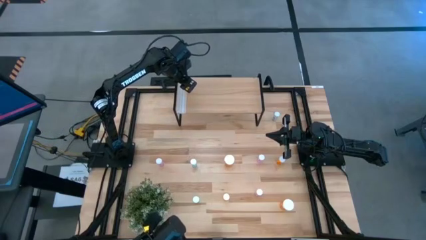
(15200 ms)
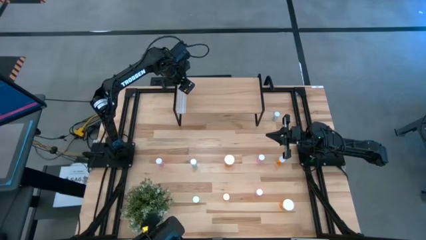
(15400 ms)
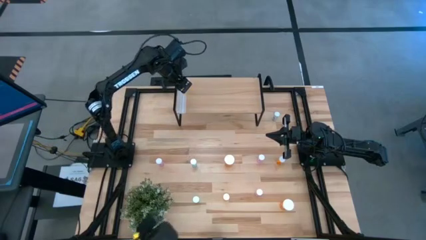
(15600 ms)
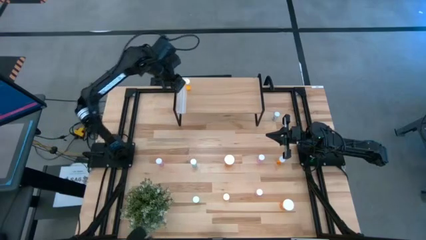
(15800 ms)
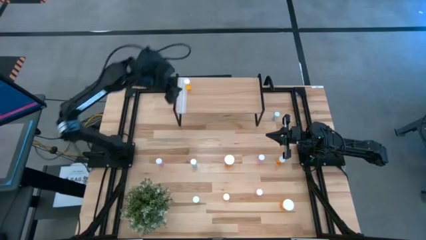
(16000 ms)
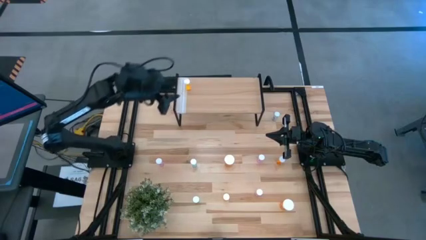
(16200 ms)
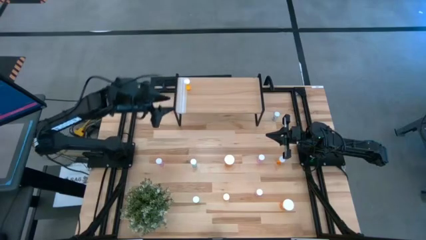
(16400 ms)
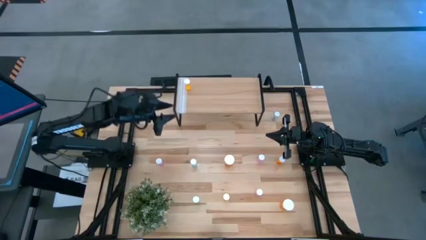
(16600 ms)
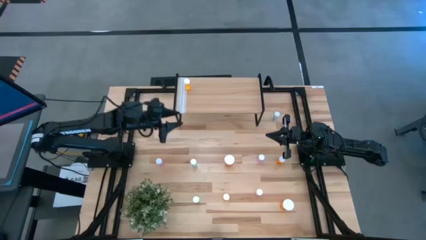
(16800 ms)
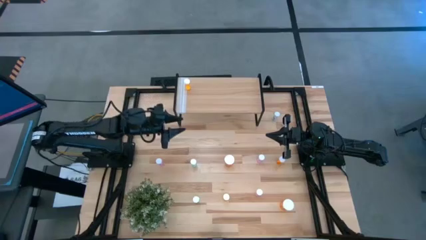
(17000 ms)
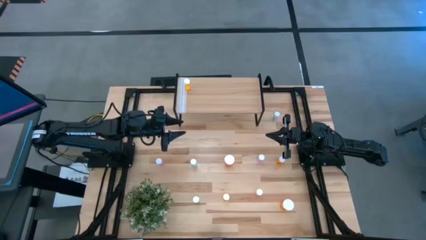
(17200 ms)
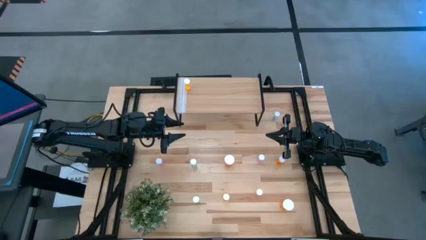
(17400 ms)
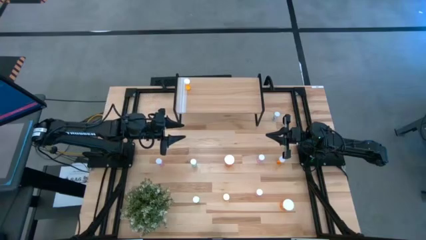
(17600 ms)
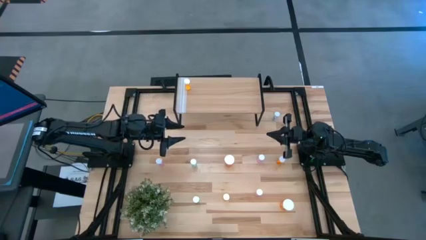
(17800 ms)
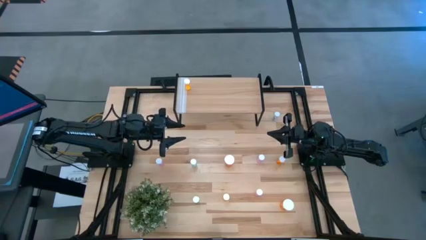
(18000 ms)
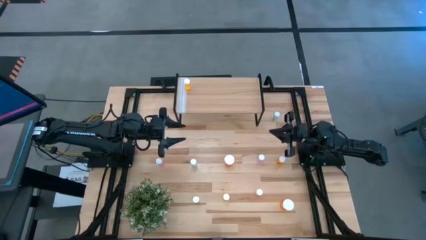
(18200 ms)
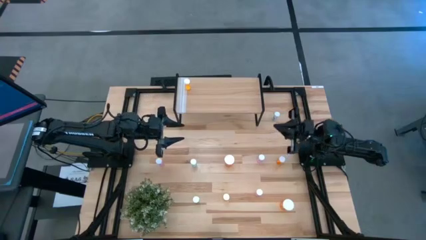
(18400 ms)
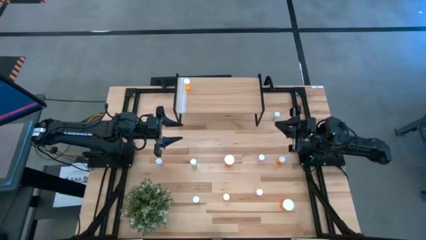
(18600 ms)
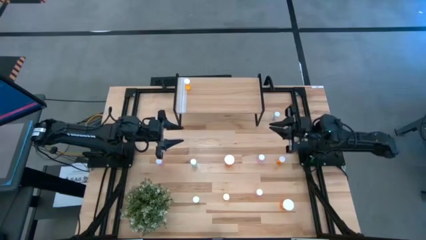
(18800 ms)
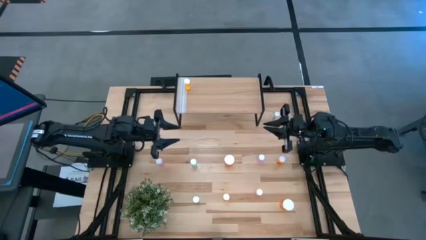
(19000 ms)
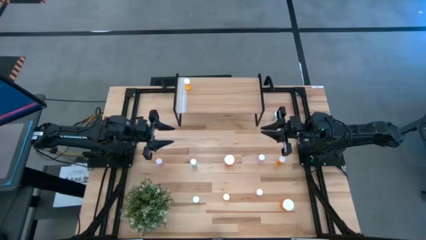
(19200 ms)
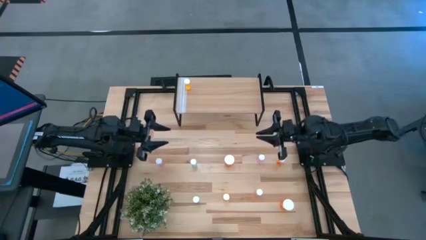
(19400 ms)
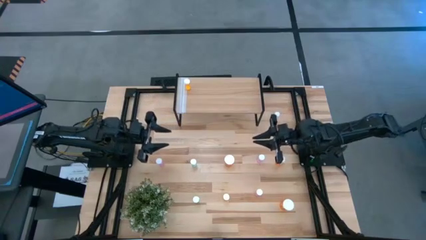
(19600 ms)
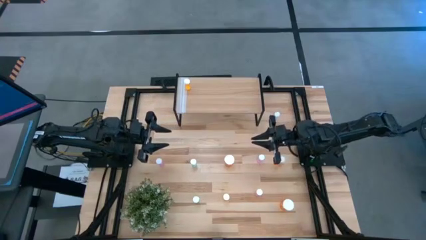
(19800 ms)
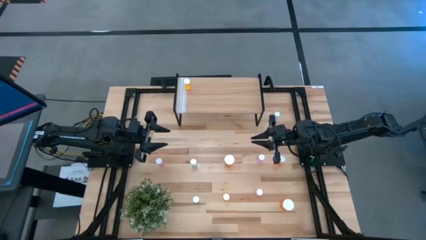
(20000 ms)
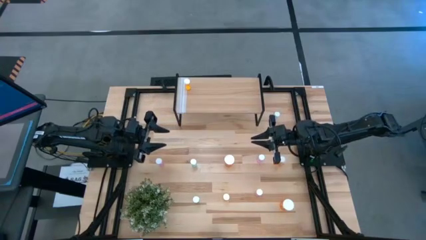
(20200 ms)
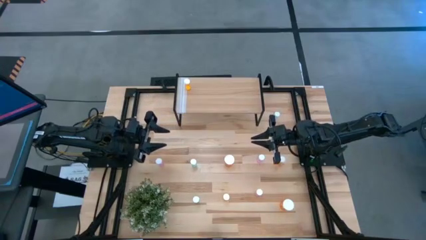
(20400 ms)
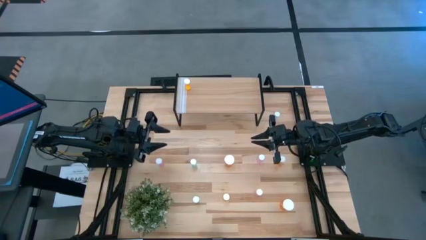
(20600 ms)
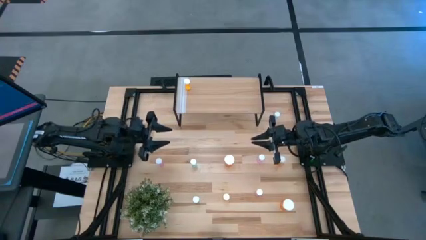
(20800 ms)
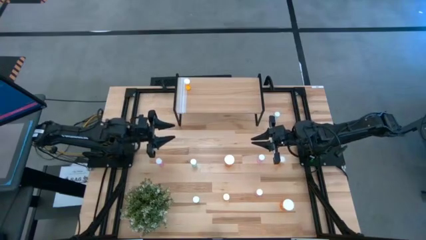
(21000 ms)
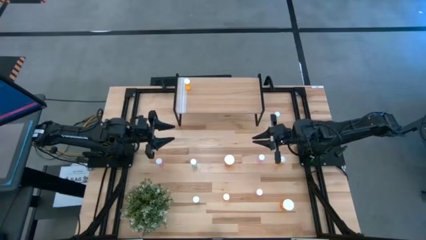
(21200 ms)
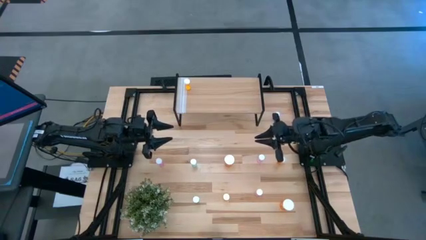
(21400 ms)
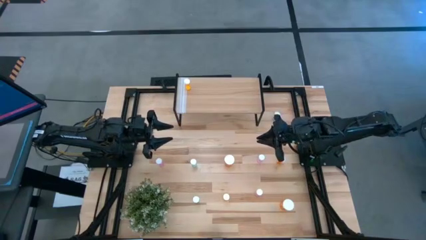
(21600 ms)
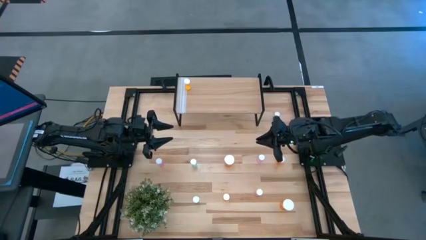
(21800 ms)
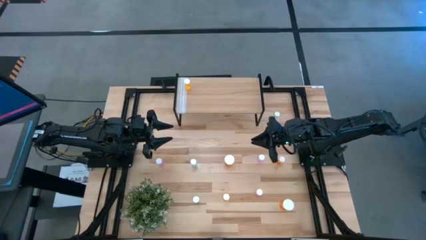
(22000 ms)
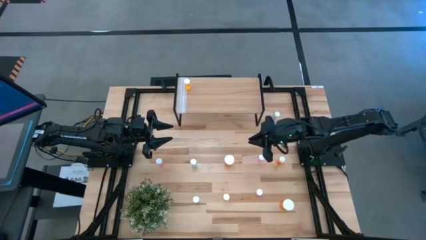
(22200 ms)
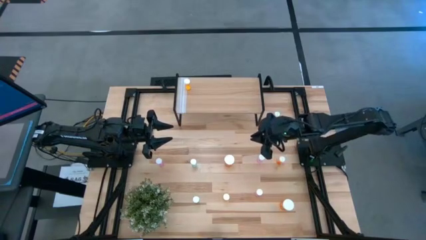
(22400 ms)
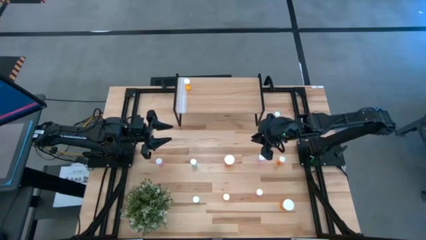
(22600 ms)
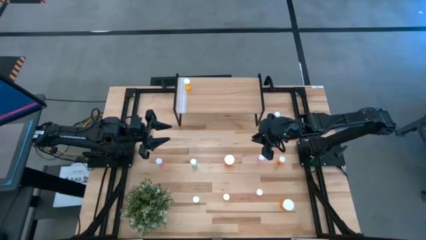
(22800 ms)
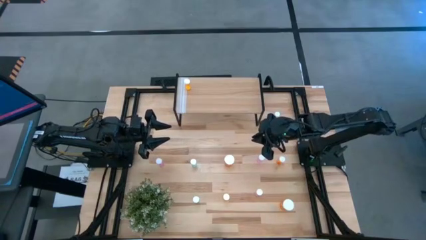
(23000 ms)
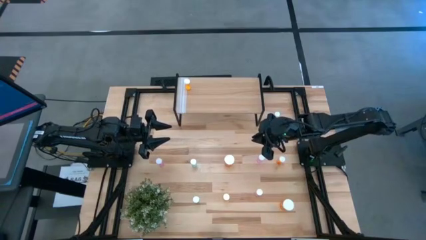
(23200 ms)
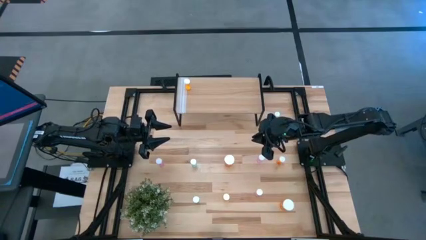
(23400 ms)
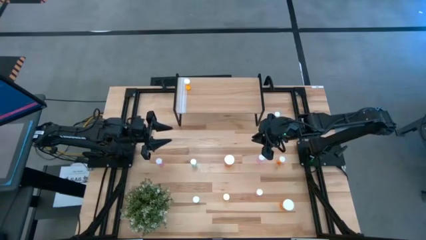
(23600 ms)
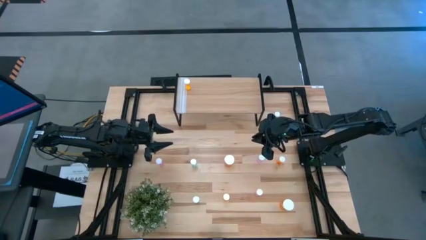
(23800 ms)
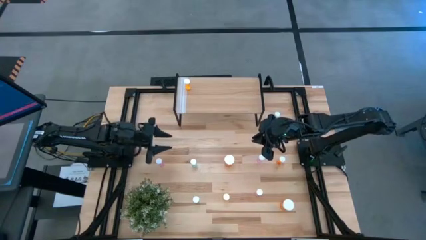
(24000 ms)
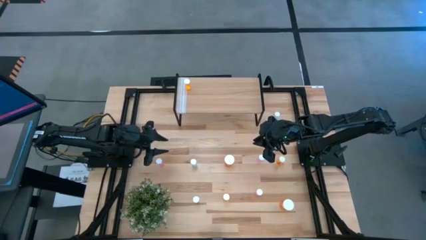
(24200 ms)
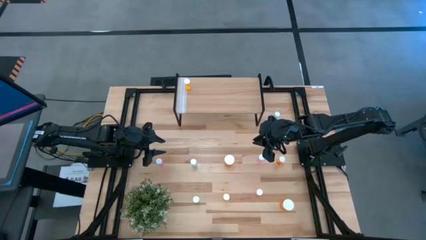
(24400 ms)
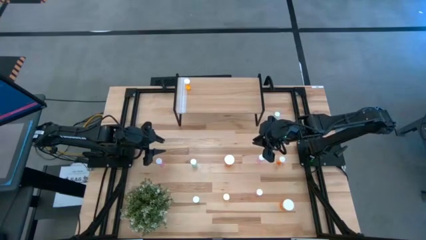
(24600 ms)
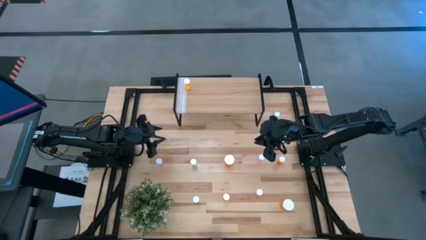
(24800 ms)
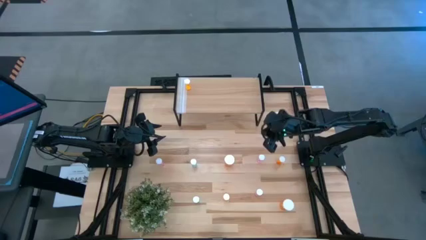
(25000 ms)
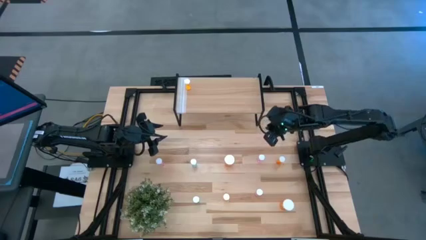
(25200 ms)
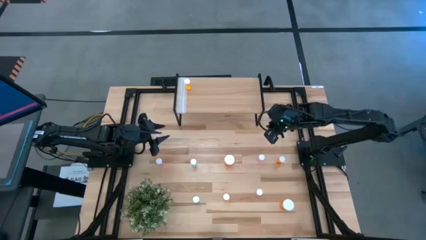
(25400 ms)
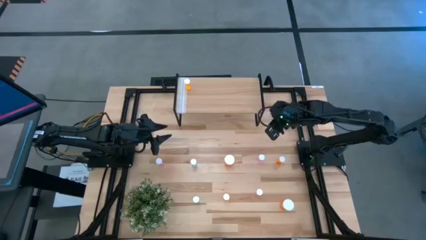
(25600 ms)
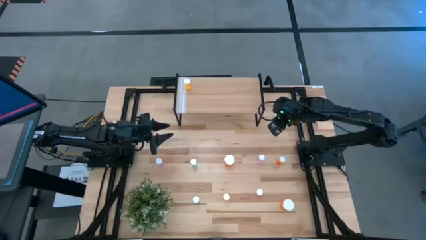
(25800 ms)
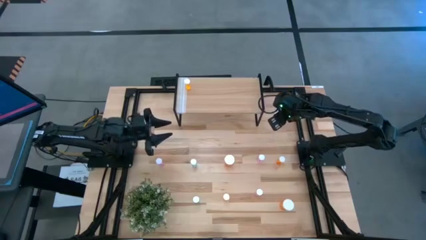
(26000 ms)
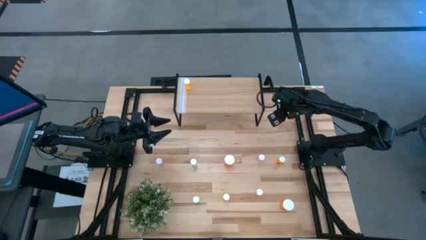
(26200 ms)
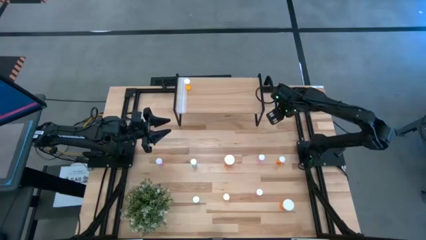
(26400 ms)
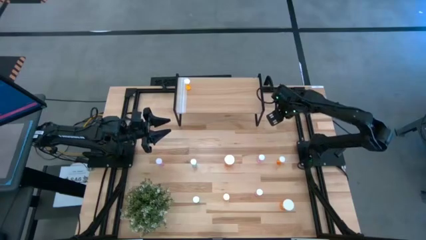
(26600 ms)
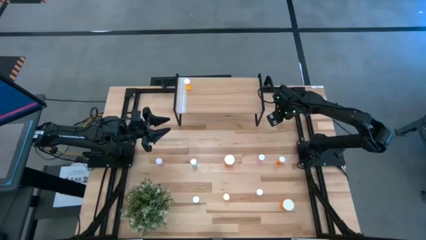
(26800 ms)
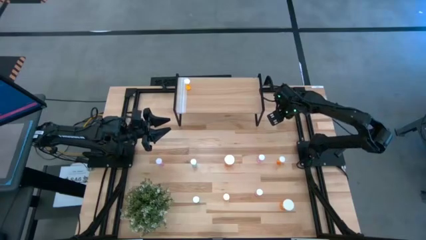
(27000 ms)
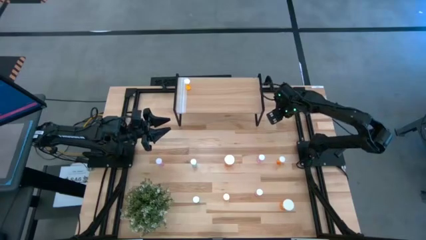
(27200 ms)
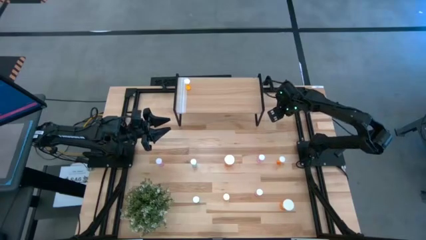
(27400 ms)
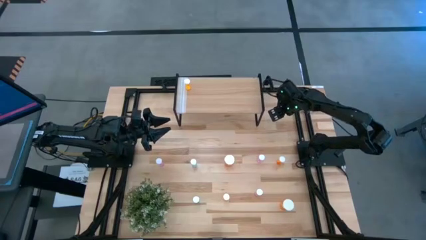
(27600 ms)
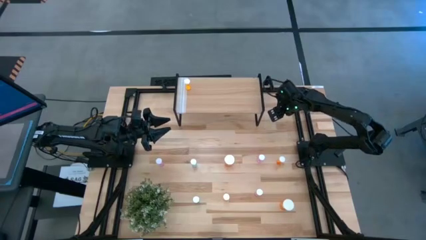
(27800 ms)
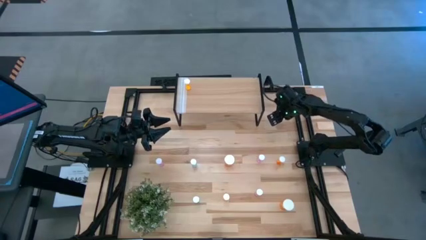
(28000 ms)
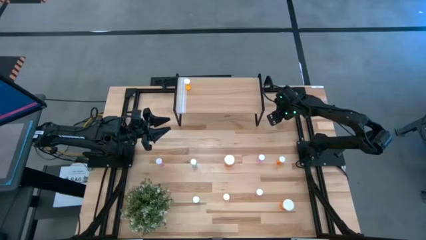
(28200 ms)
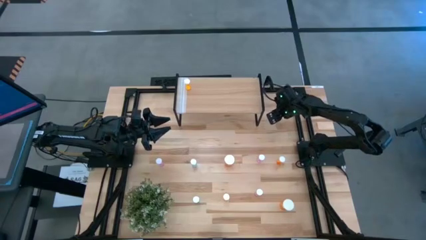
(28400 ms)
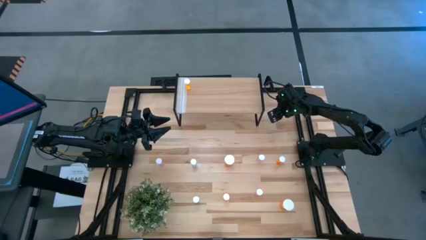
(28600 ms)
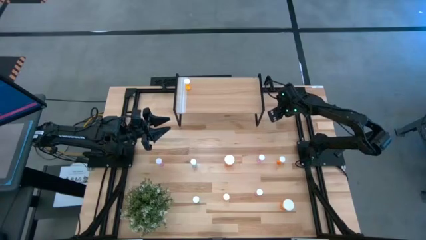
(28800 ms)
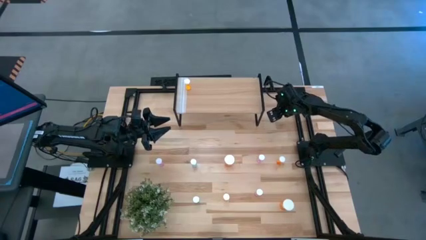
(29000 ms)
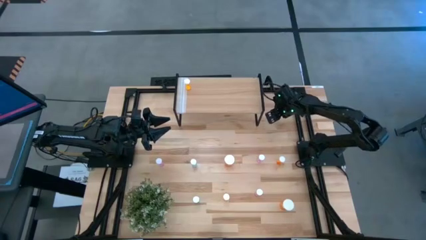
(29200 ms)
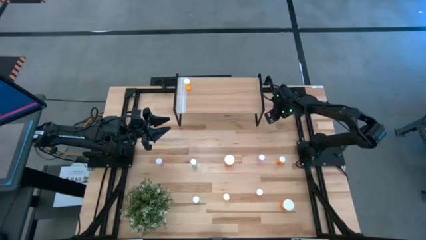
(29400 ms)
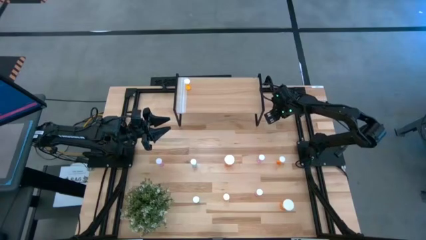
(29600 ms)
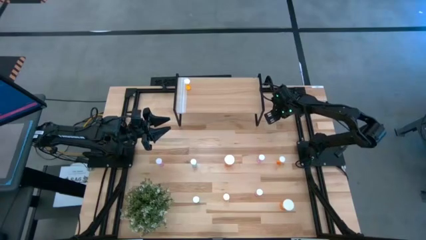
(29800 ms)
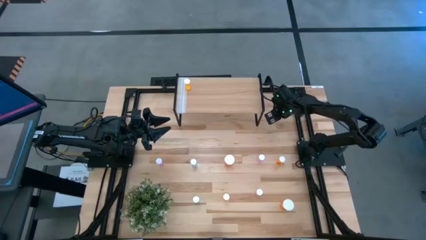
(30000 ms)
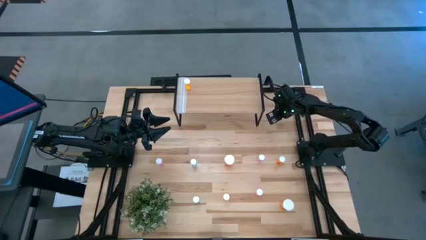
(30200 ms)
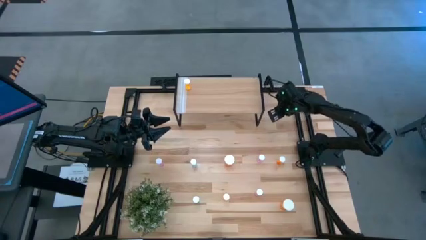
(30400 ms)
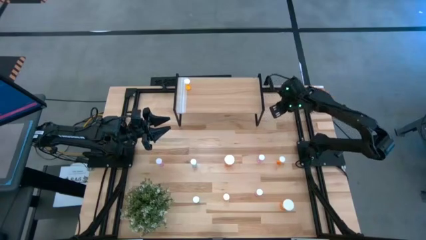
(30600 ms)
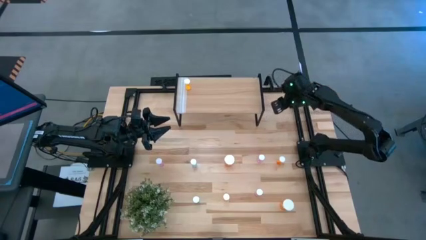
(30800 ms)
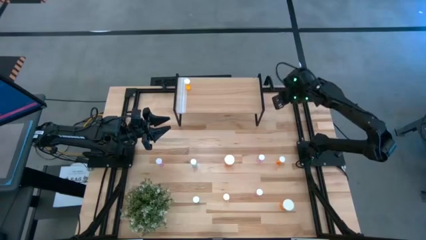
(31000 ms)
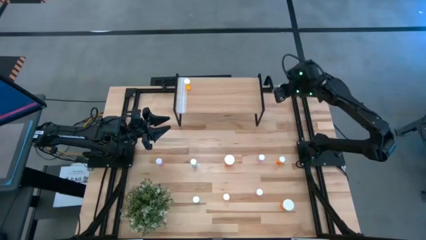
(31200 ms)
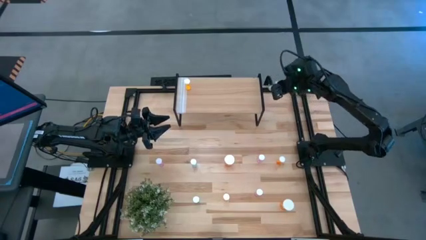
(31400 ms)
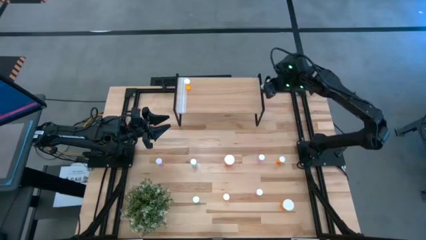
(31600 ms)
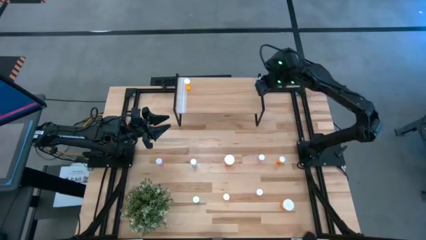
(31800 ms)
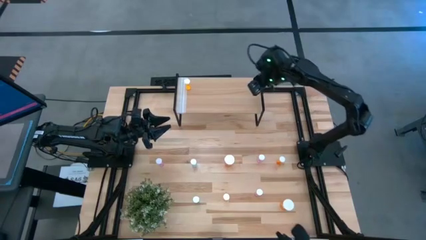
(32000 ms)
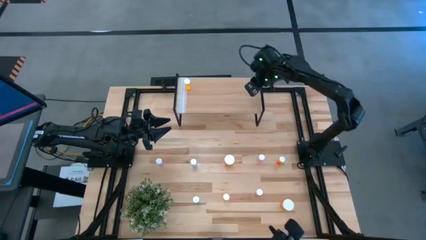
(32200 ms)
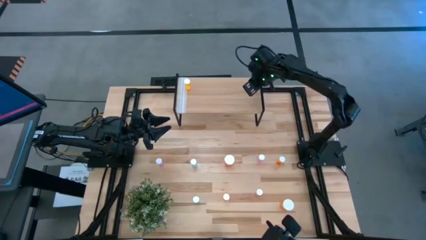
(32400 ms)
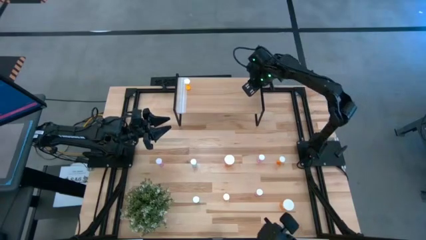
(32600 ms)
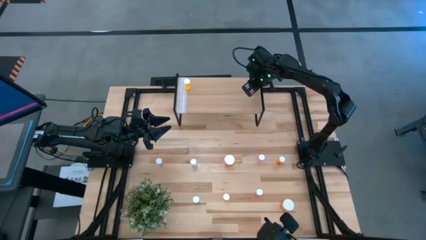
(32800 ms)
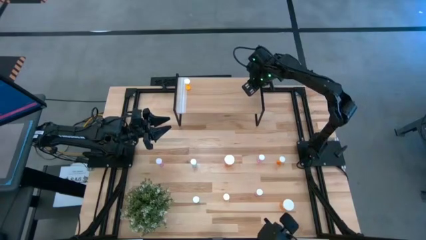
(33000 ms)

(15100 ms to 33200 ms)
Task: Pick and place medicine bottles onto shelf by color
Put the blue pill bottle on the shelf
